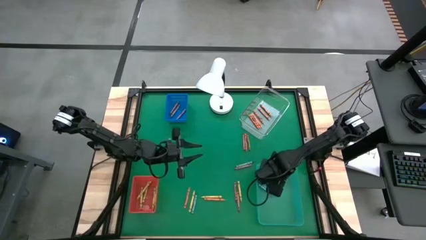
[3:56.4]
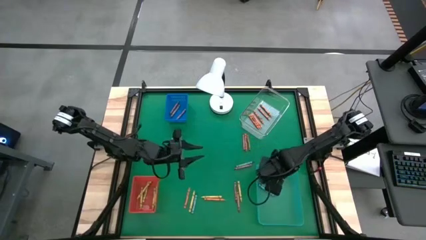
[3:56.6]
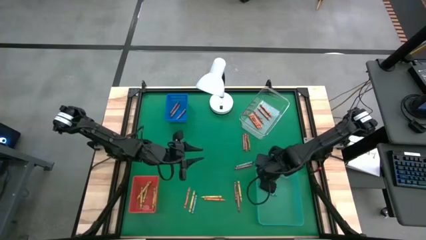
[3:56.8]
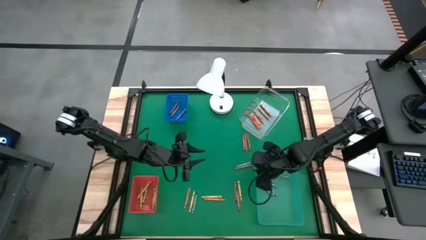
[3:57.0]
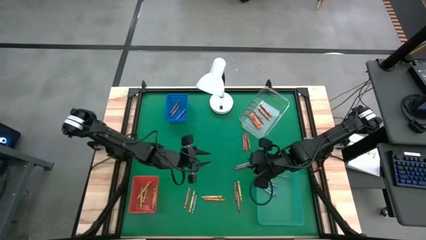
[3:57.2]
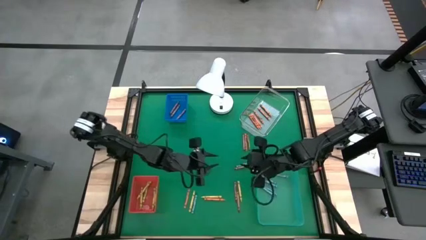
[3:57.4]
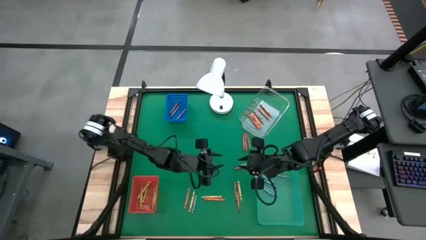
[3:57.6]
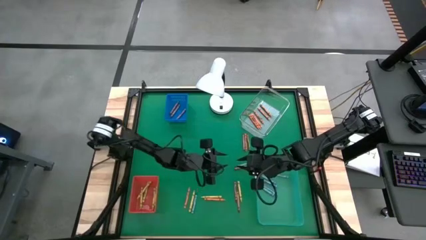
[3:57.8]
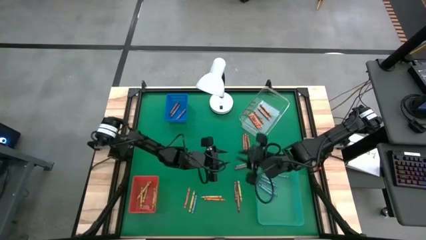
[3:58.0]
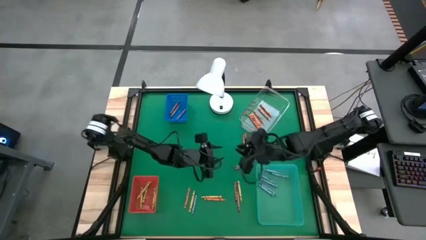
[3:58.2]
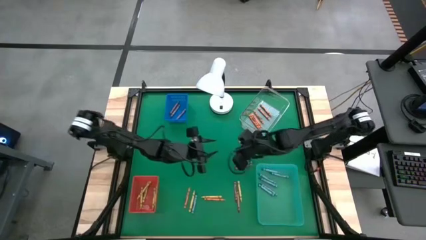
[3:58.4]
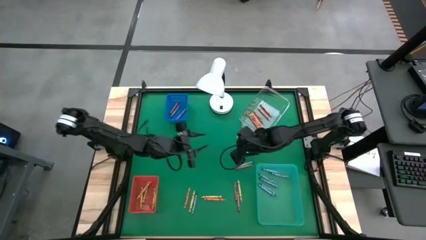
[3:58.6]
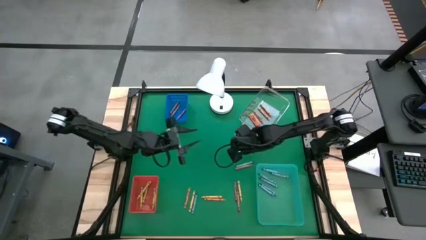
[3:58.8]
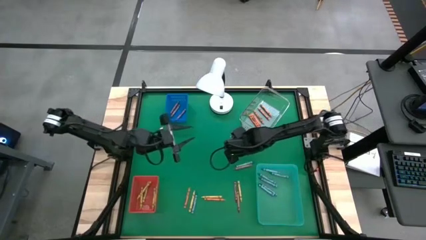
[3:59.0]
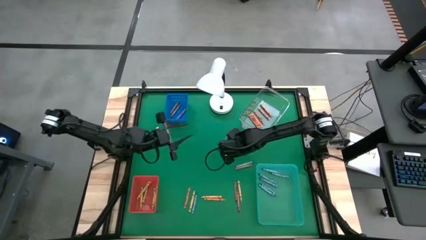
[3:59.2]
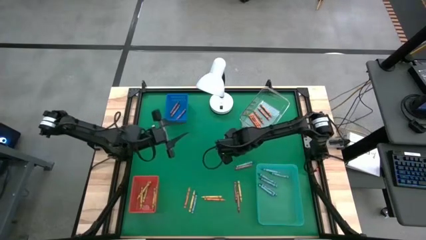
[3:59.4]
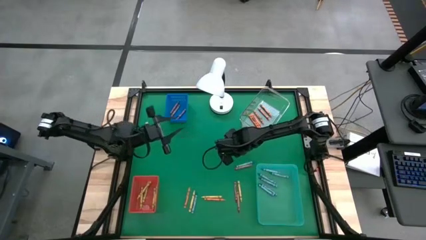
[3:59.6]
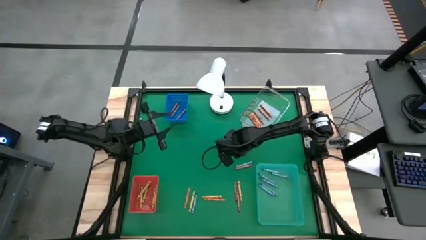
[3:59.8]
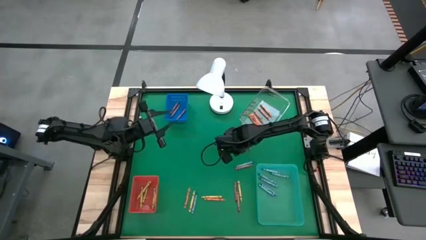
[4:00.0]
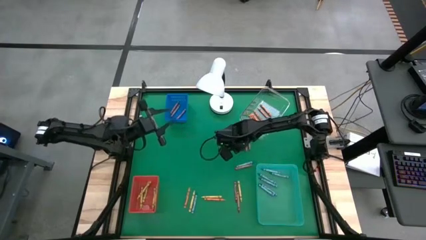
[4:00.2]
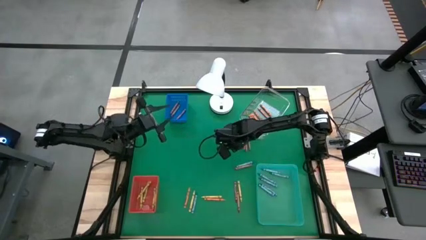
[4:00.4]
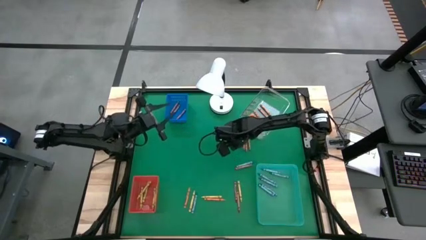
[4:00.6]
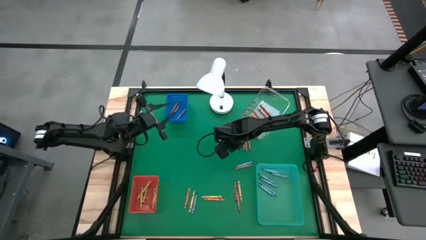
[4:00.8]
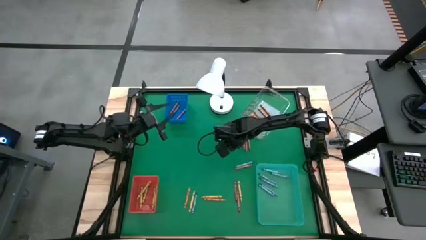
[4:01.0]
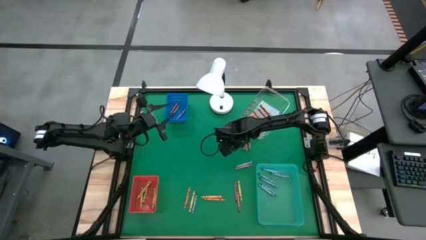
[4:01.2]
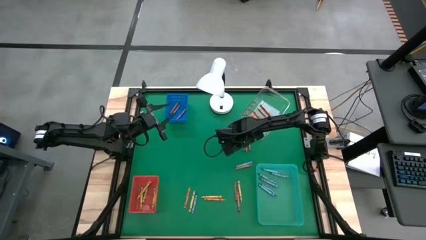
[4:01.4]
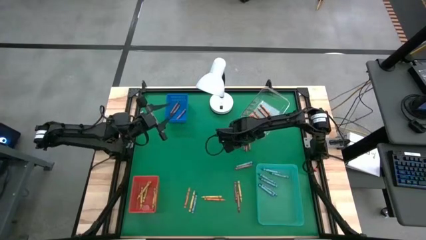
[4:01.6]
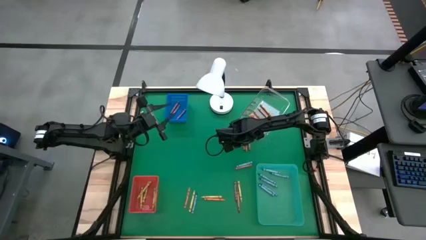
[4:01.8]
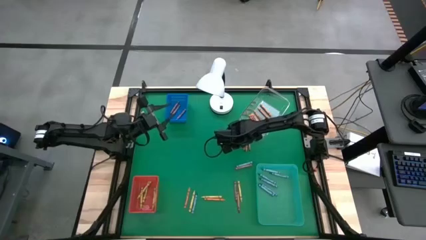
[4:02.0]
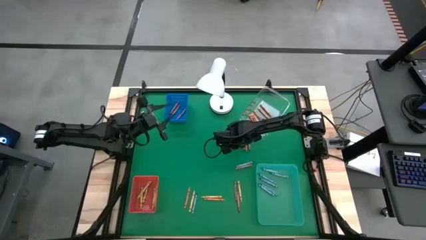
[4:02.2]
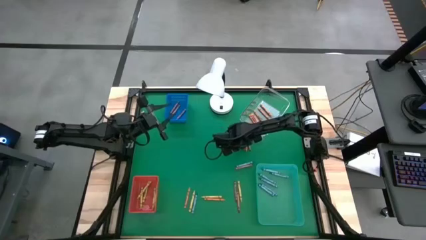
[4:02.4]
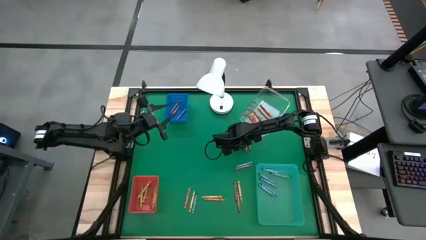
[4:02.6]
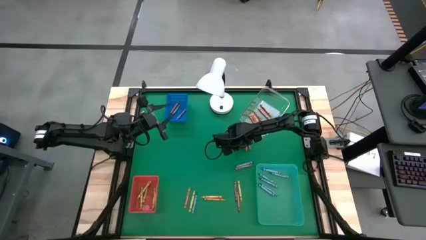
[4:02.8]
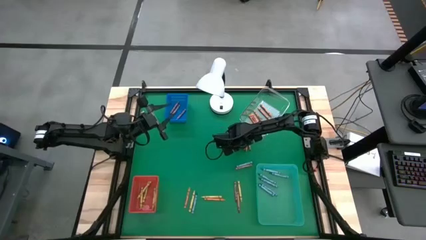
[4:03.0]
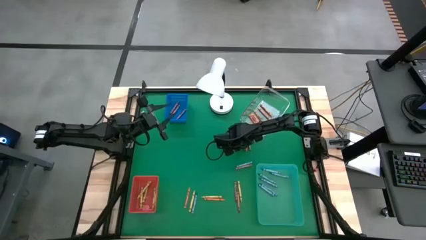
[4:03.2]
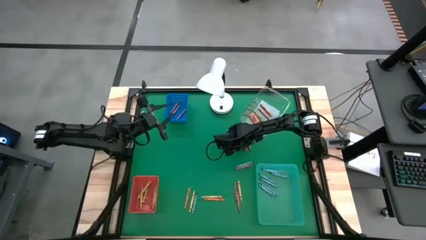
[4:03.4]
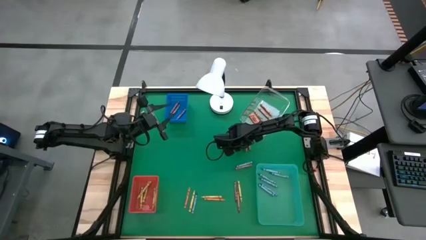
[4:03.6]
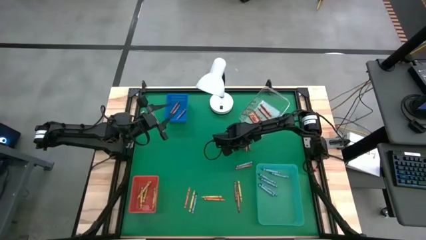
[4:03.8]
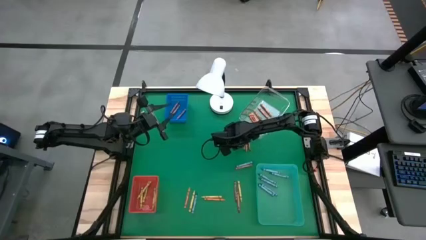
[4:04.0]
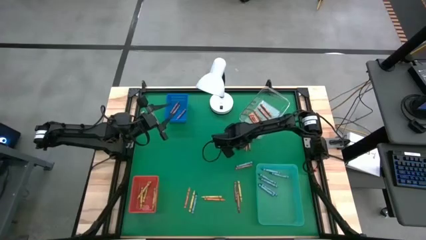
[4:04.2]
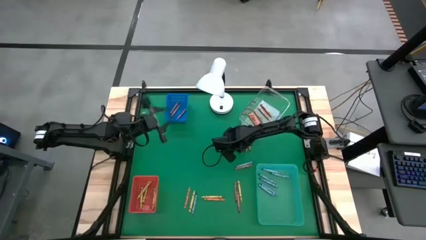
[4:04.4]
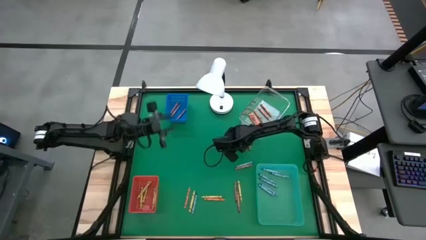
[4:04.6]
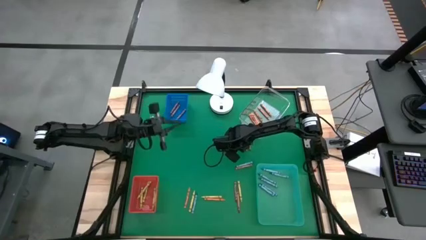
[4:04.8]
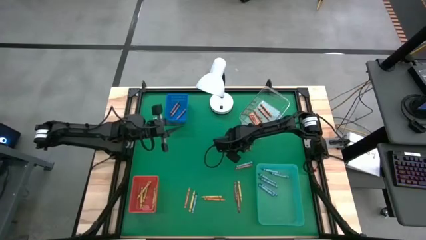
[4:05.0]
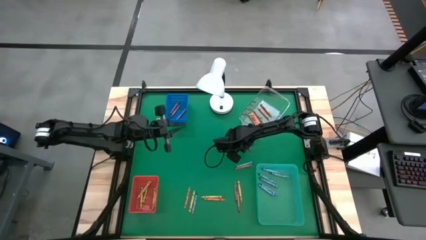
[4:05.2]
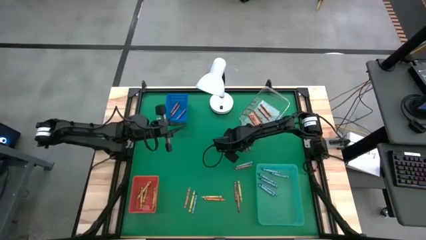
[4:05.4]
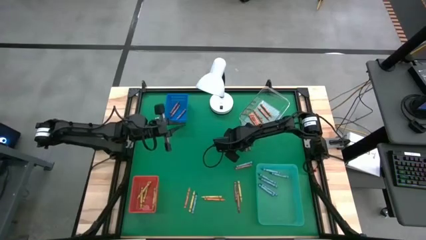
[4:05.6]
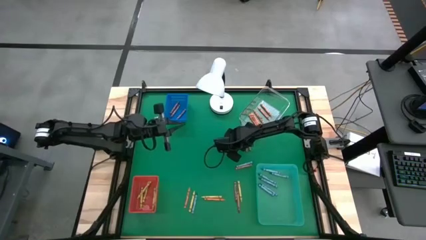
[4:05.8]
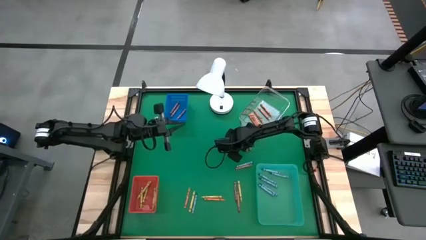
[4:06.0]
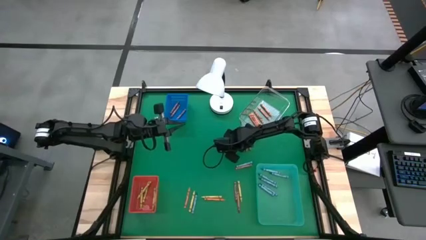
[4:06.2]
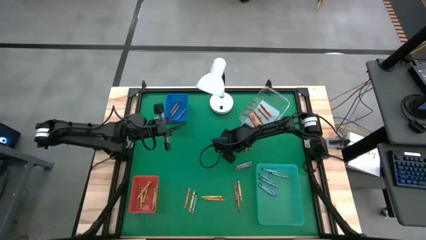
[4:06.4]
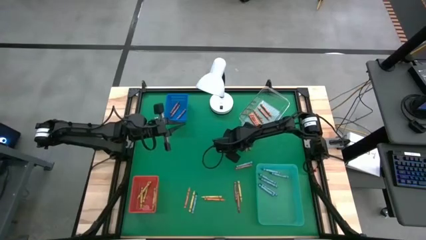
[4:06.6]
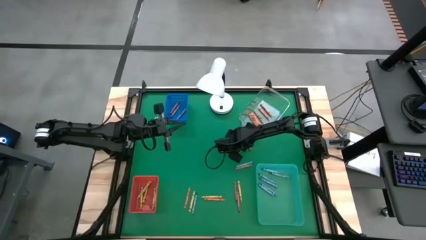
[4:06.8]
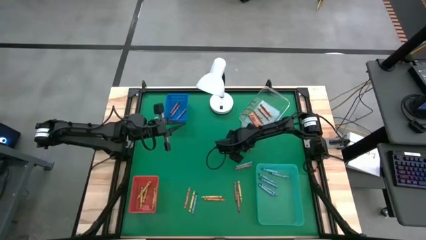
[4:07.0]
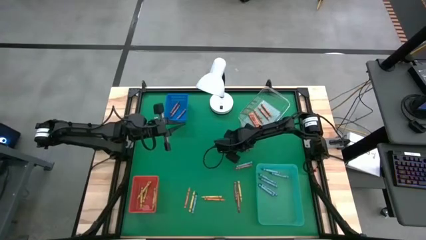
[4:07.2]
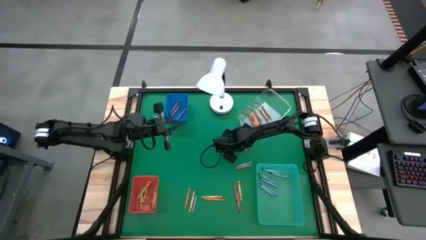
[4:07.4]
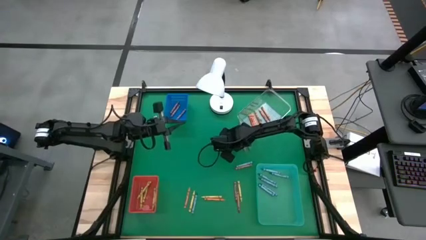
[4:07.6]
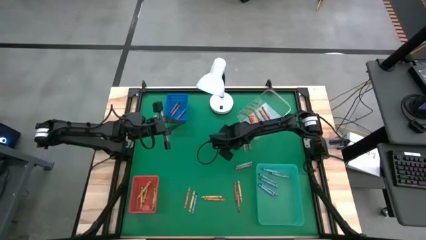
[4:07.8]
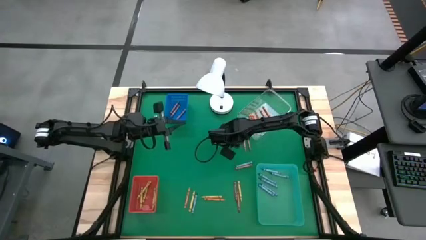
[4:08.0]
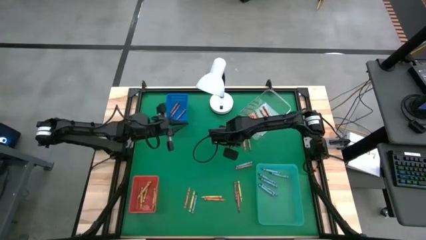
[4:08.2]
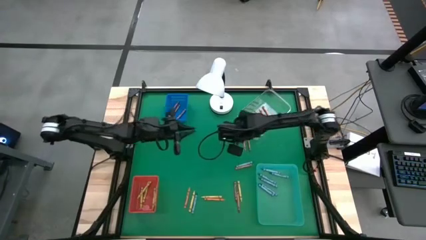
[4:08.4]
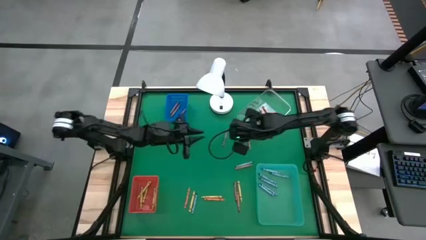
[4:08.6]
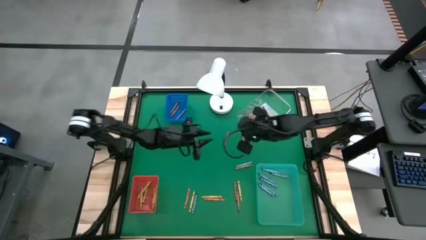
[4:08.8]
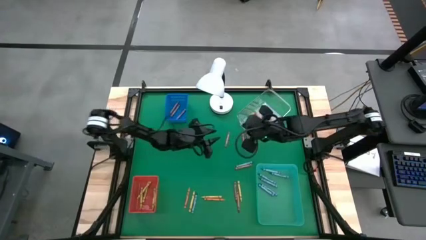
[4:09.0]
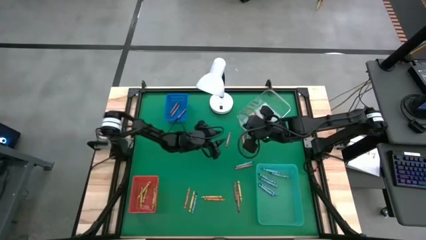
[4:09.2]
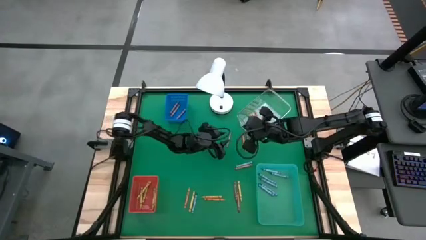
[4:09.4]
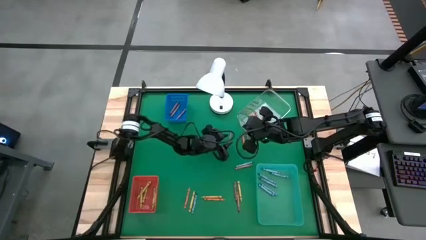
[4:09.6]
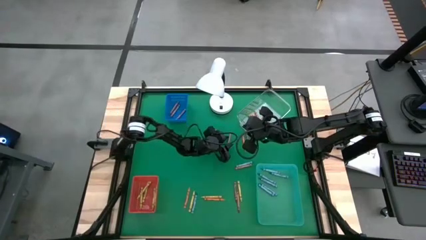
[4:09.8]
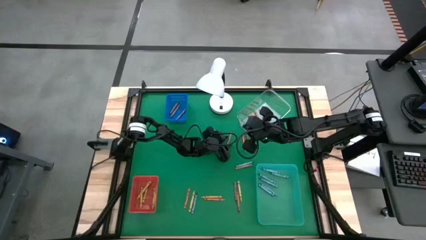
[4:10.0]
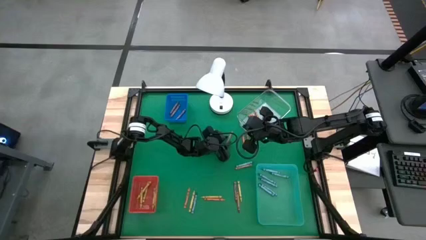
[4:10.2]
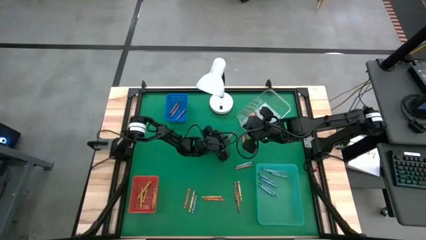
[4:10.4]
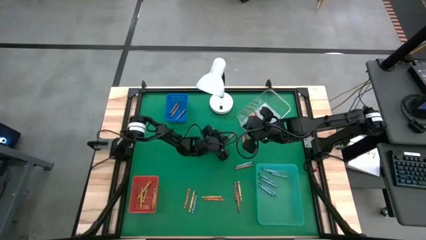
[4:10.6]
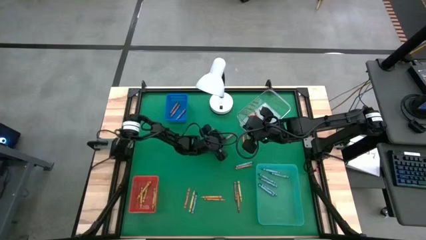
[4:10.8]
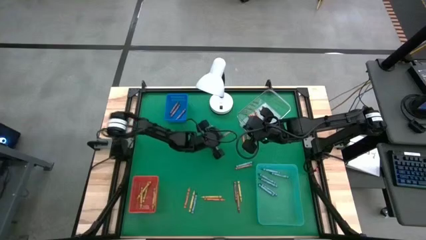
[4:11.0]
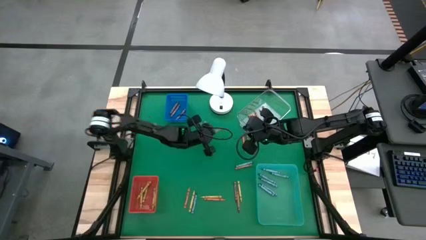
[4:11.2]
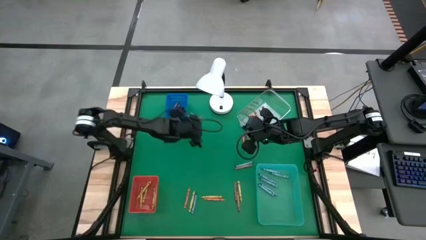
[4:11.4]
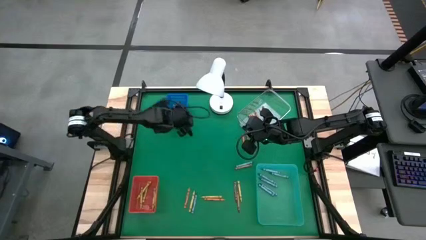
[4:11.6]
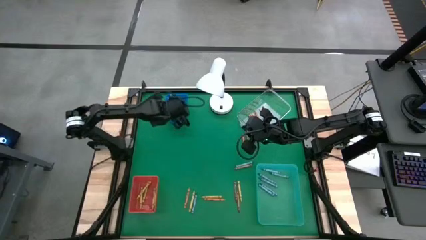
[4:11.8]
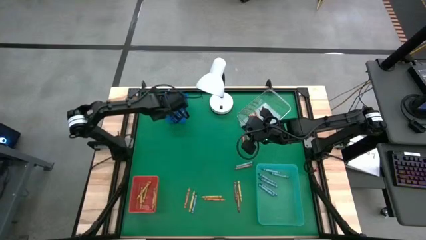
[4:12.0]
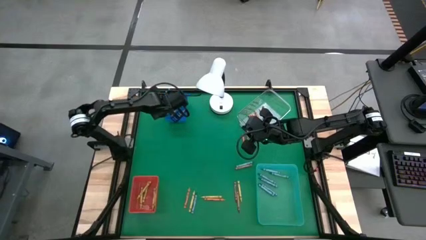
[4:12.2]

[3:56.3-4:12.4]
Task: Sort crayons
Put the brown crayon into the blue bin
